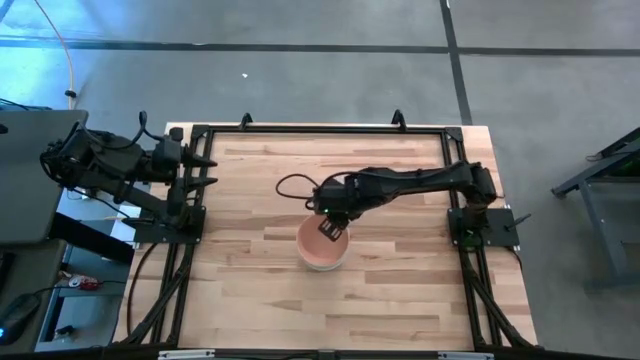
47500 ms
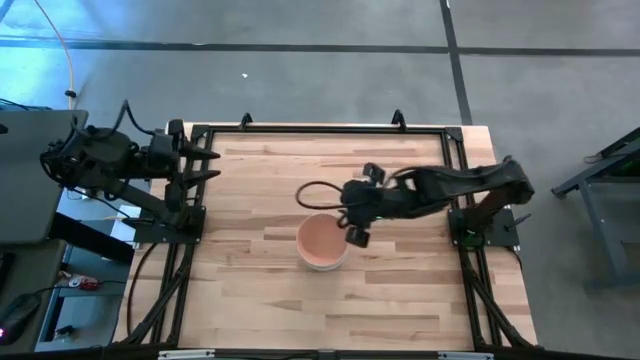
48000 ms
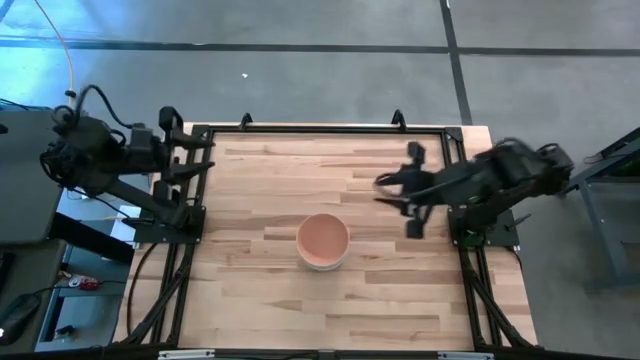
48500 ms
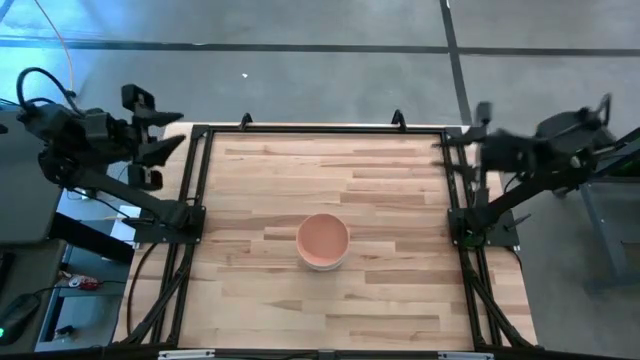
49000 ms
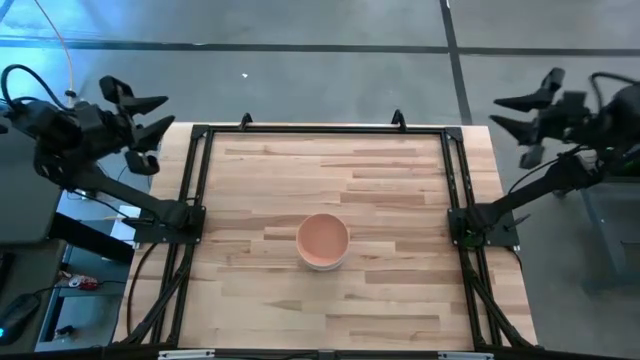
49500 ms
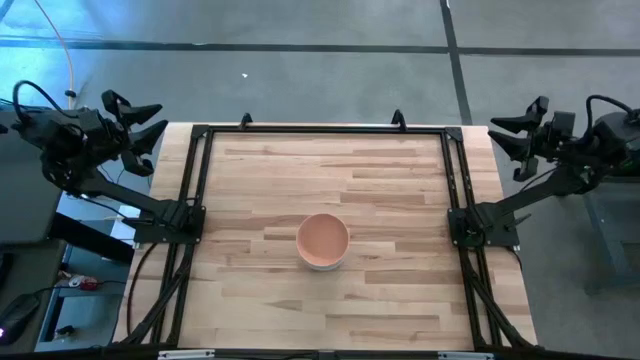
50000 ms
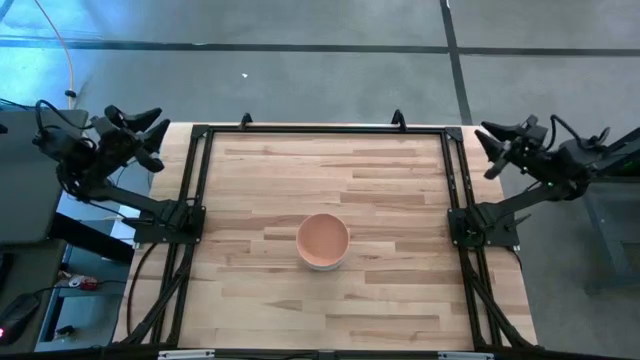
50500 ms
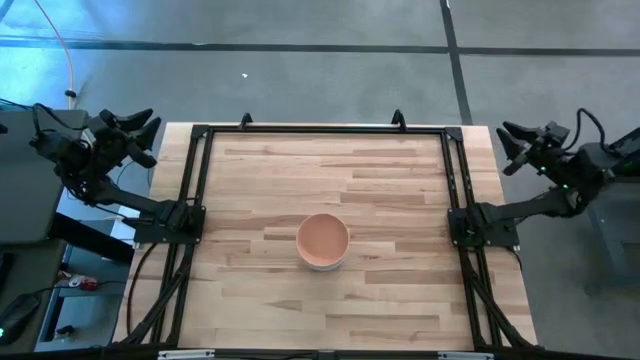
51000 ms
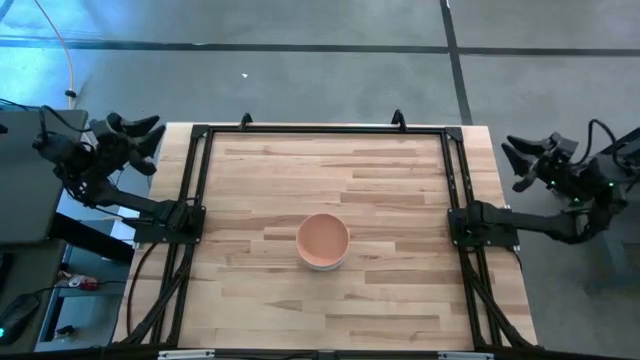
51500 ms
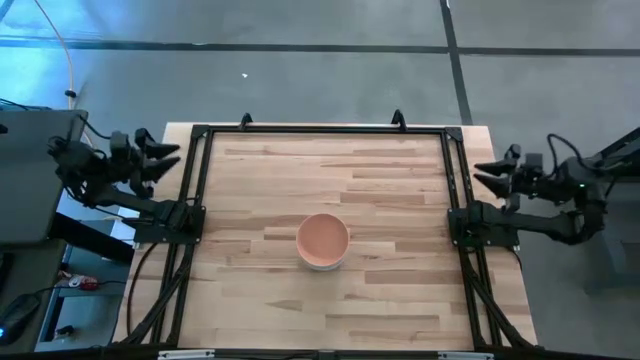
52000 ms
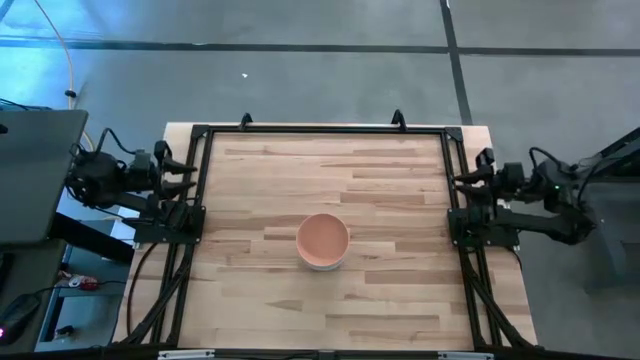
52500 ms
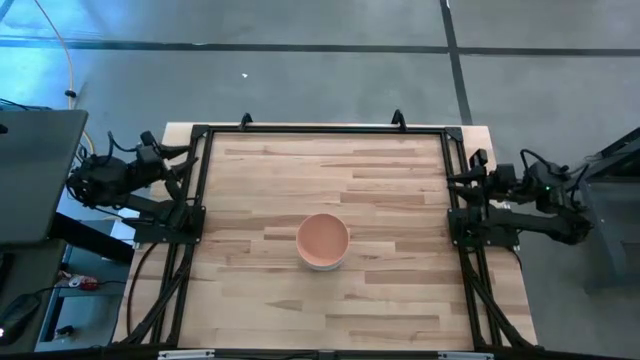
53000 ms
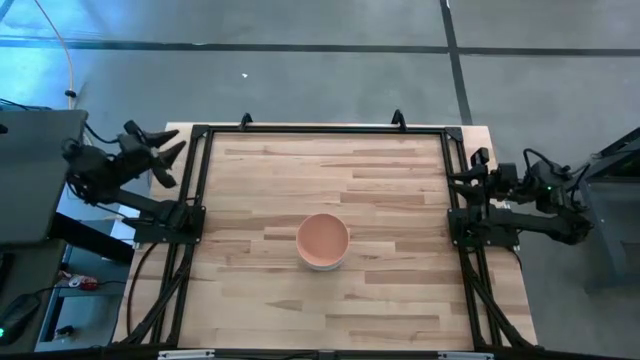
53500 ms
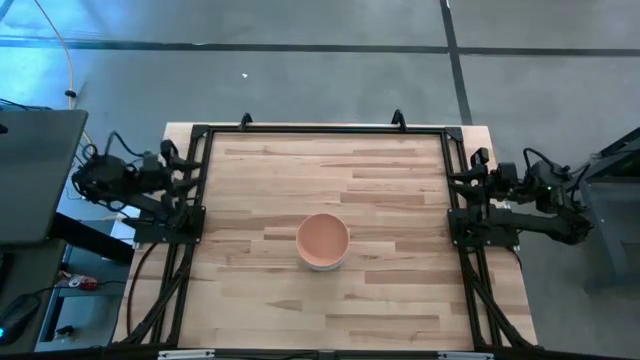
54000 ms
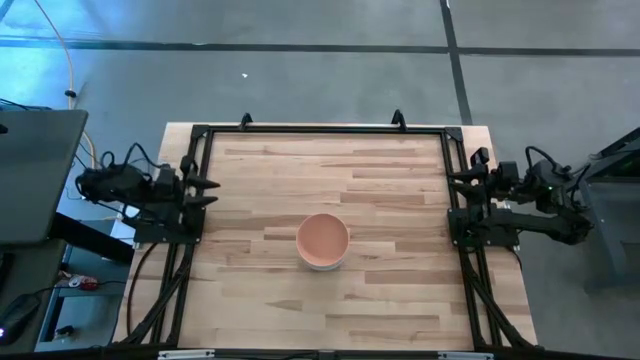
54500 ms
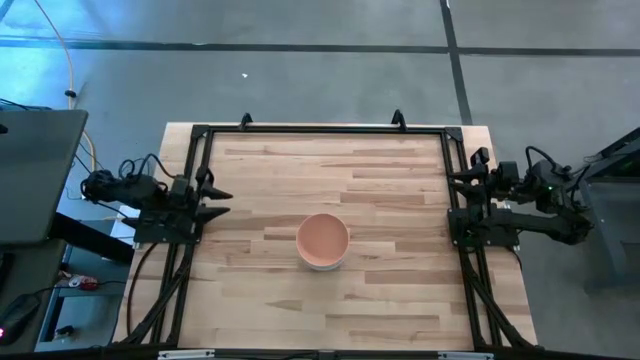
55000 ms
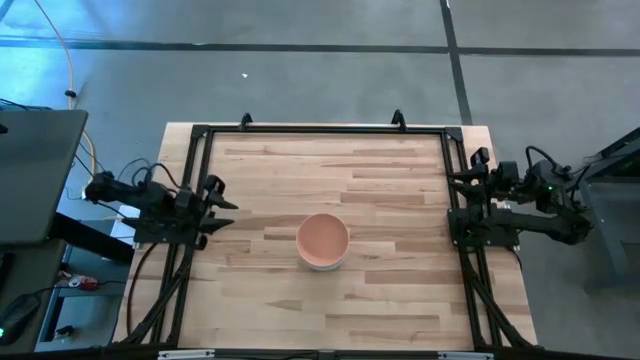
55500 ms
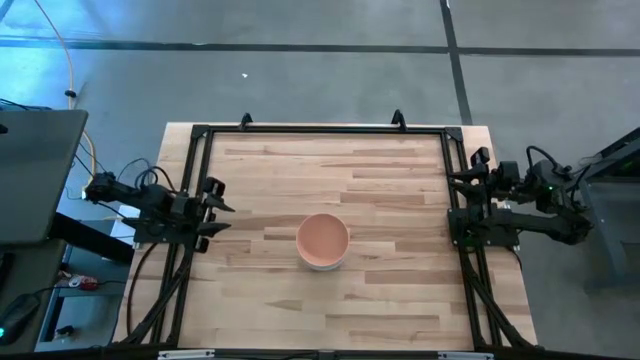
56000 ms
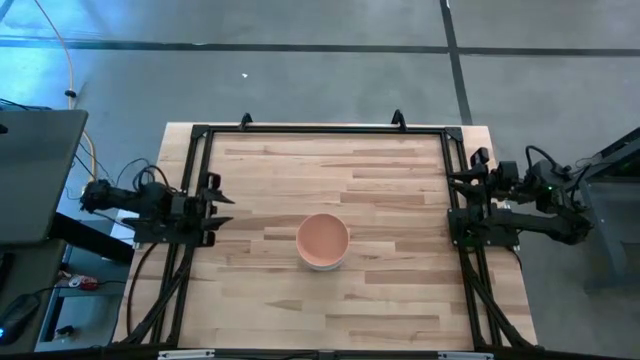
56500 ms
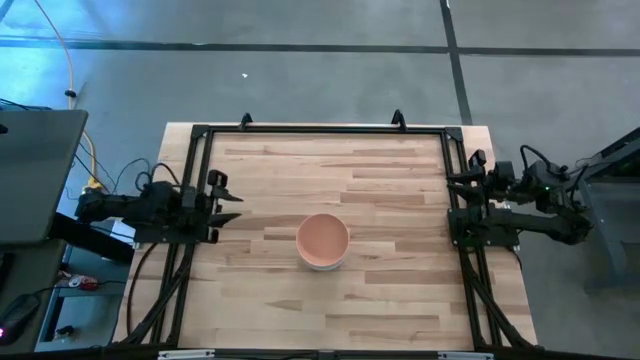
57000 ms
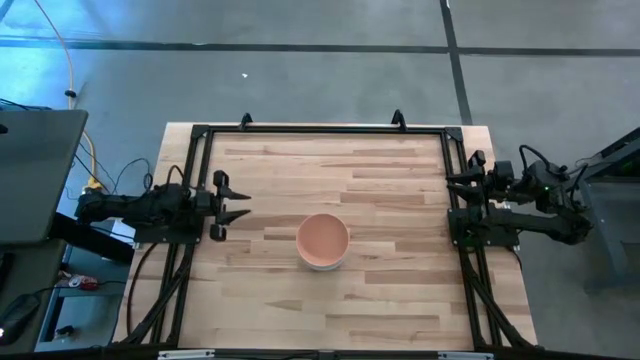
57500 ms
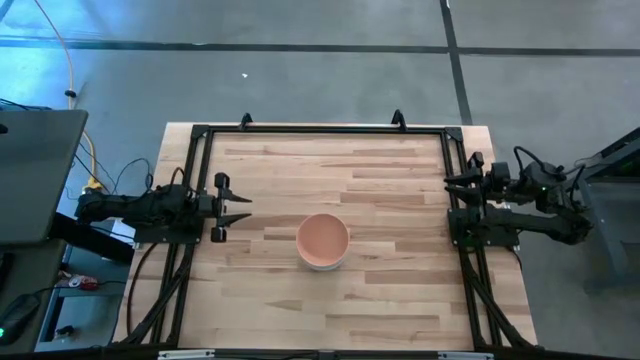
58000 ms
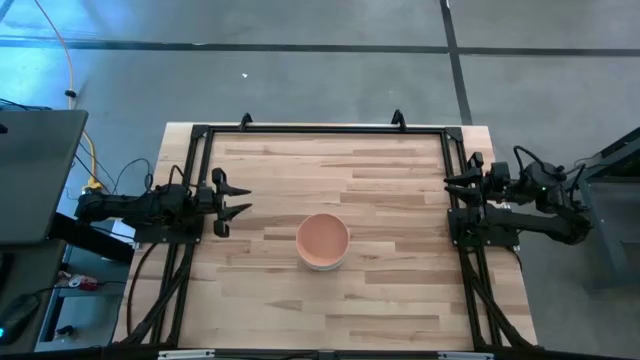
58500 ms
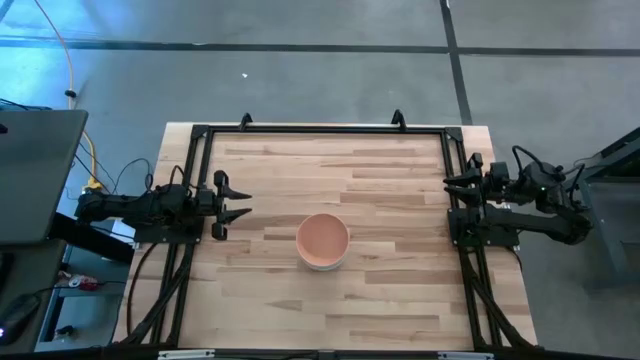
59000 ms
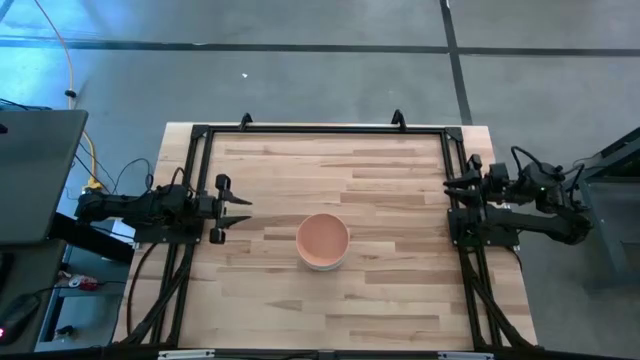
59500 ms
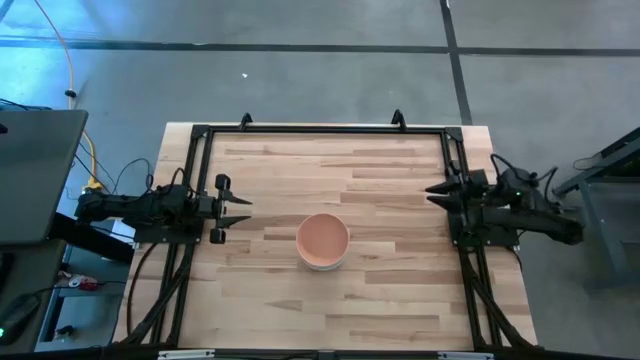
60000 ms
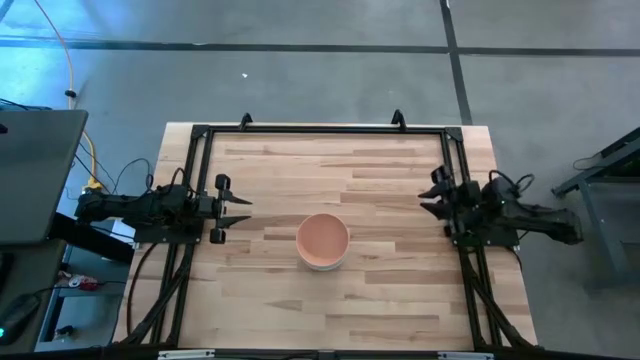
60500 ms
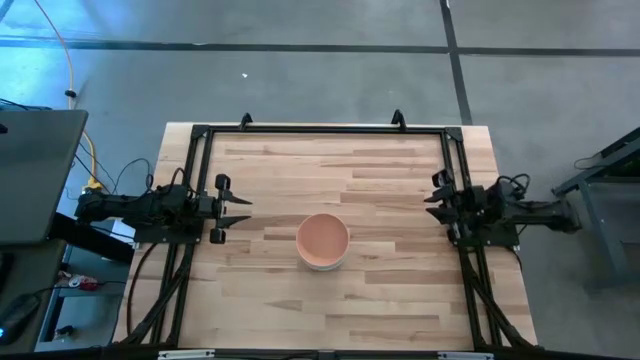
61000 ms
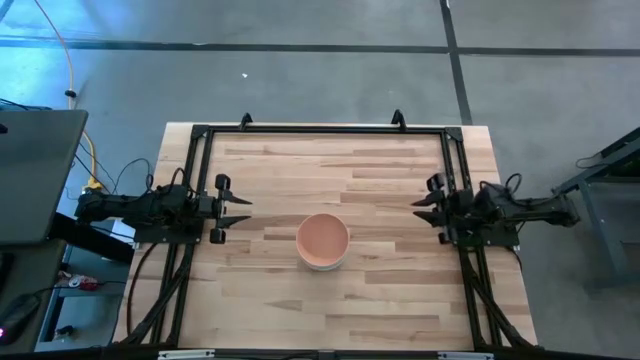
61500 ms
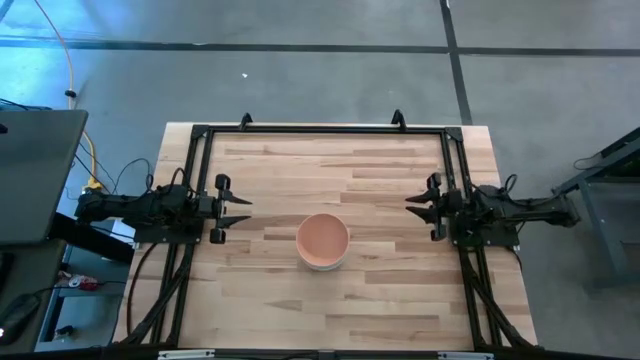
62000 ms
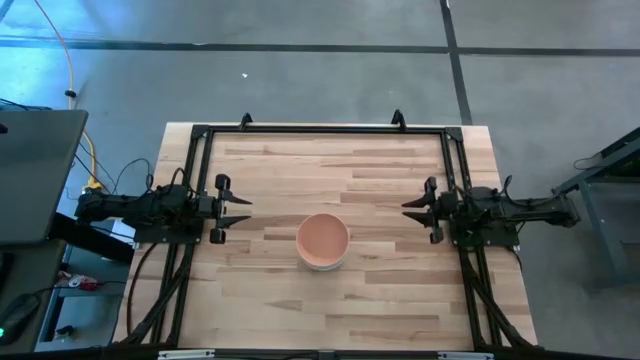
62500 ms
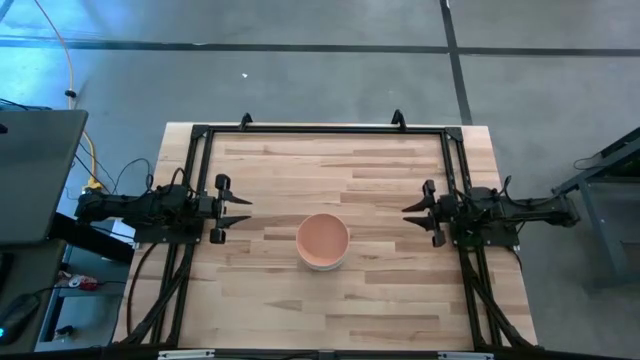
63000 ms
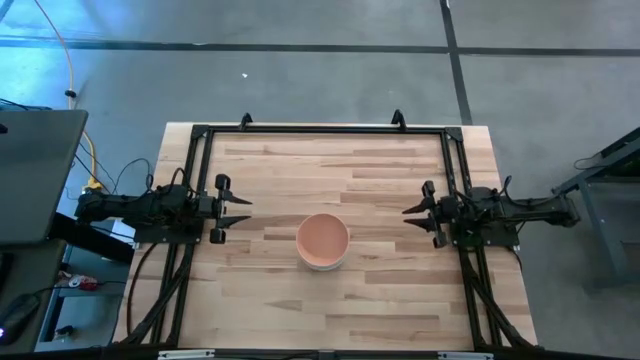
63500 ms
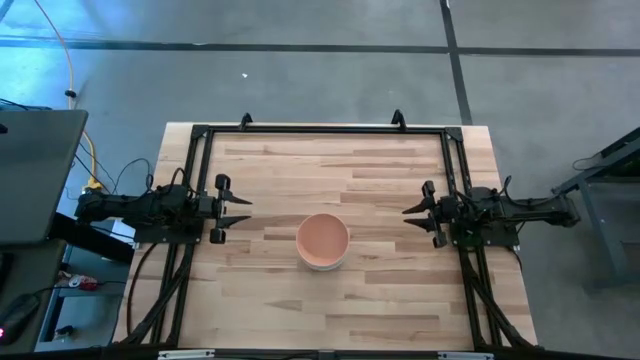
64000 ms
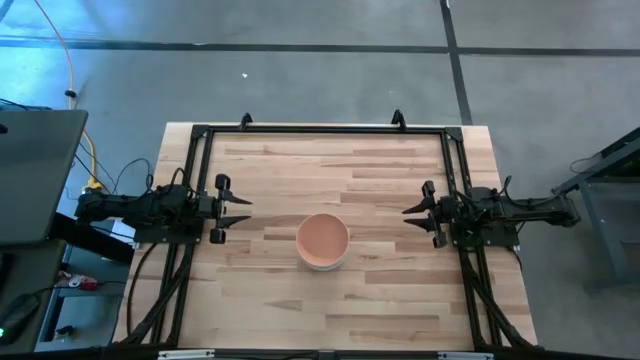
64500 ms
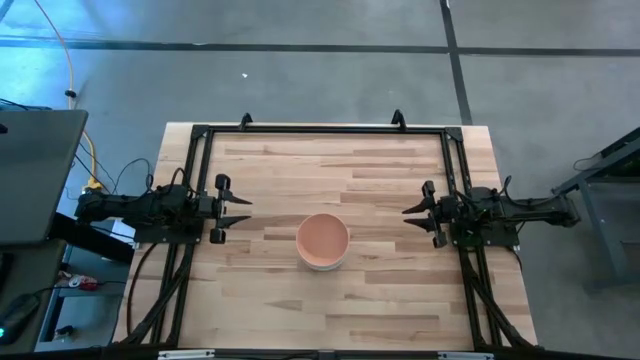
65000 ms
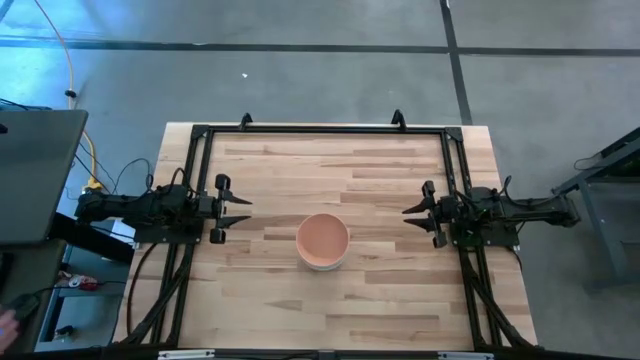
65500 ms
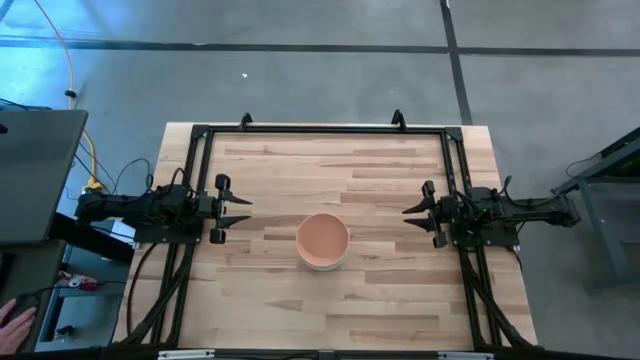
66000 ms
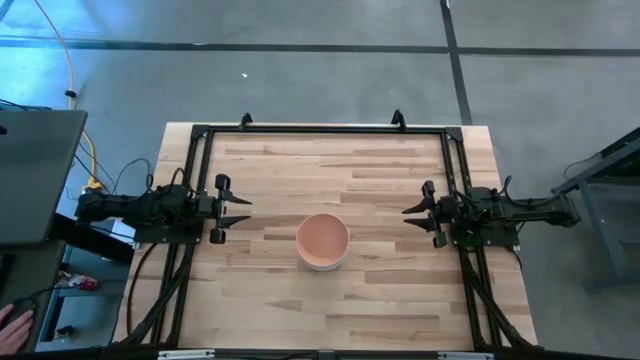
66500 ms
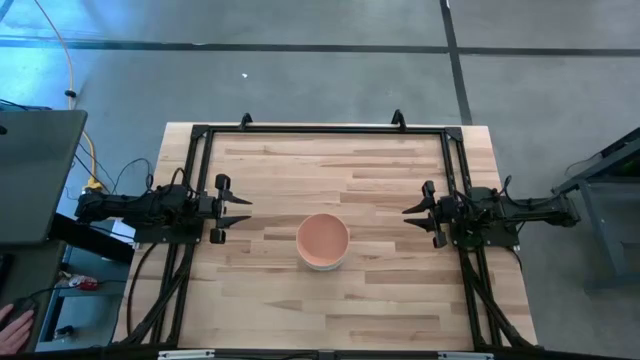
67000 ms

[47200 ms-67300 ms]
Task: Nest bowls inside each other
Return to Home Position

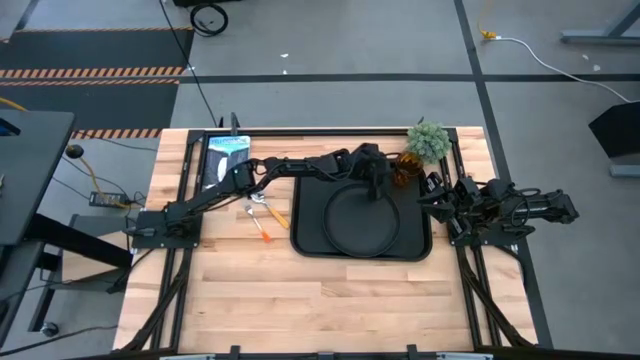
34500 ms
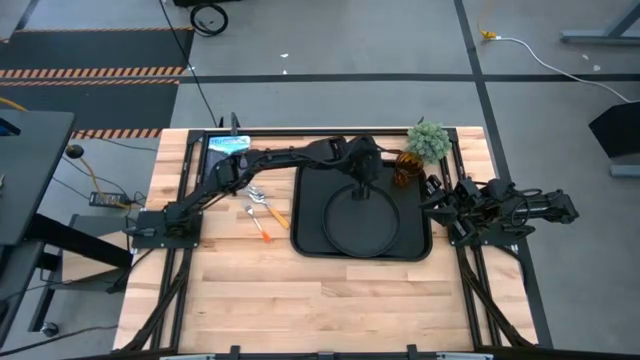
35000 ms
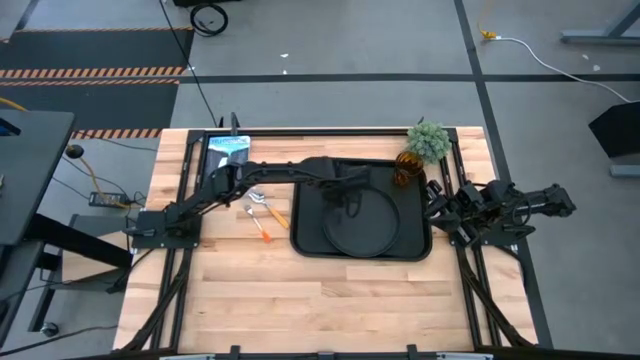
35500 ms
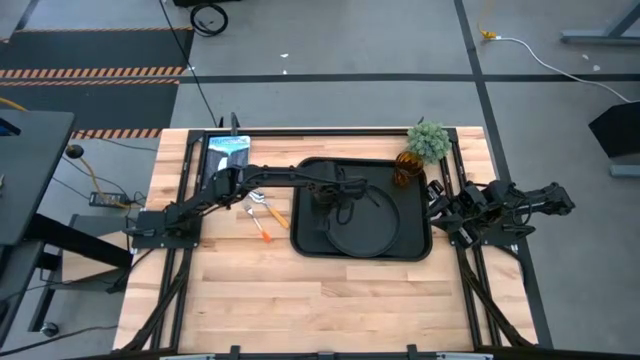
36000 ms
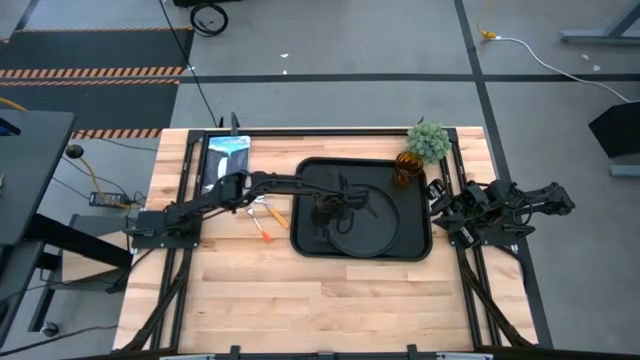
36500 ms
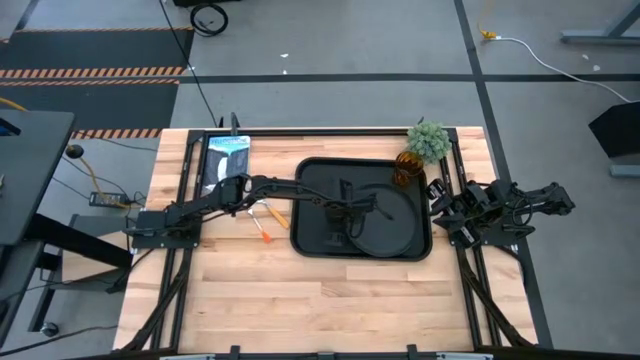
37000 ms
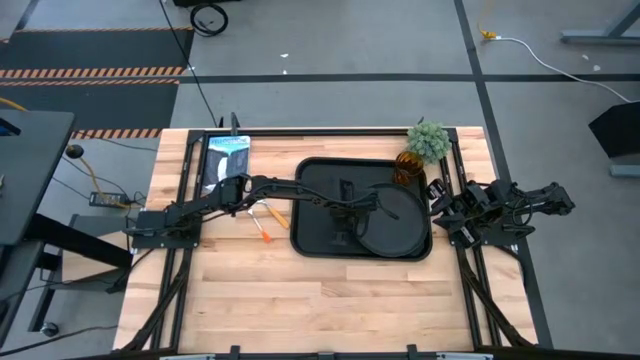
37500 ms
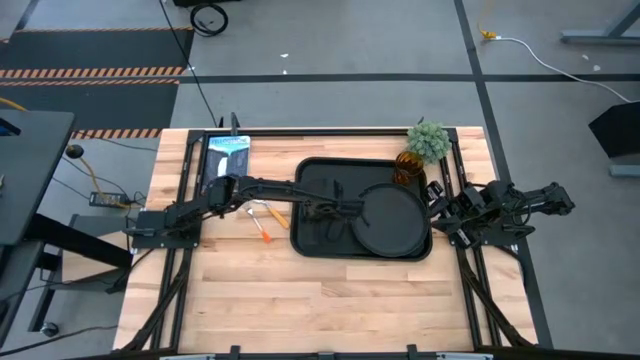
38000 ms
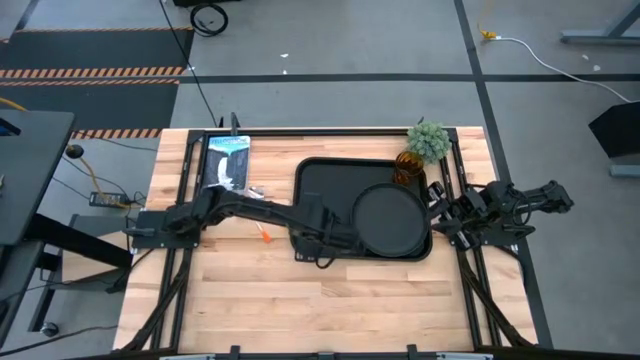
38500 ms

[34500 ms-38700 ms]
Task: Pick and place plate/cup/fork/spoon on tray
Move the black plate to the right of the black tray
